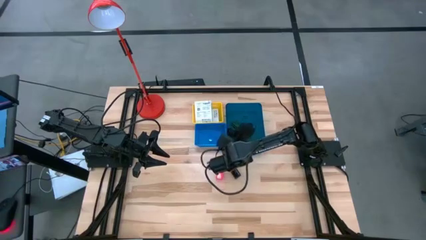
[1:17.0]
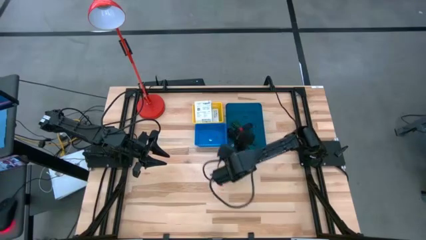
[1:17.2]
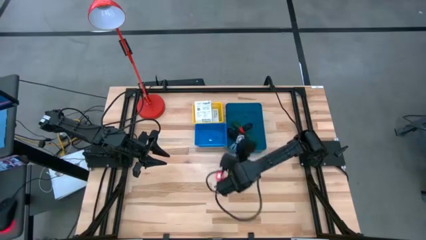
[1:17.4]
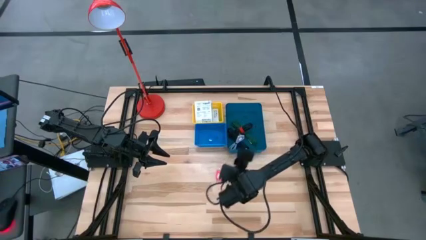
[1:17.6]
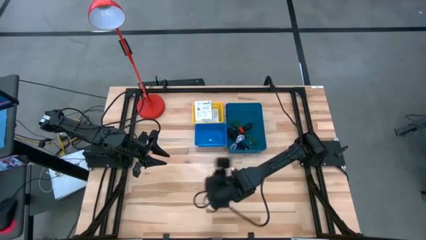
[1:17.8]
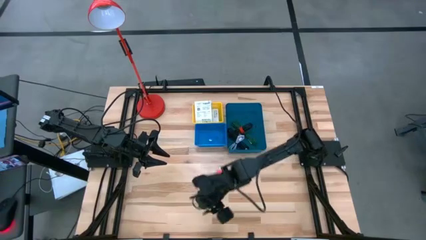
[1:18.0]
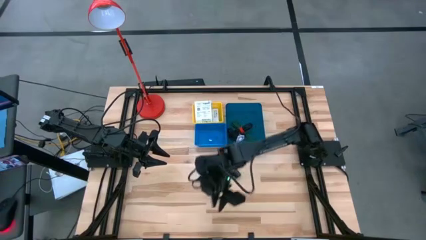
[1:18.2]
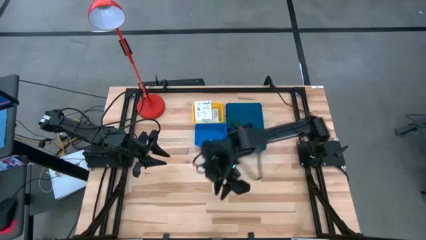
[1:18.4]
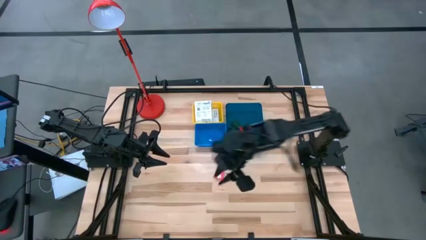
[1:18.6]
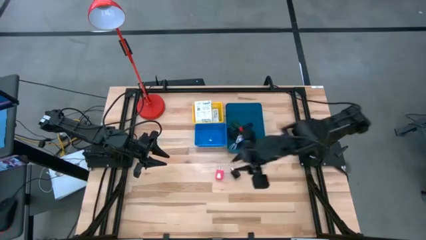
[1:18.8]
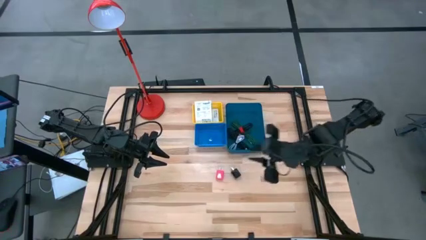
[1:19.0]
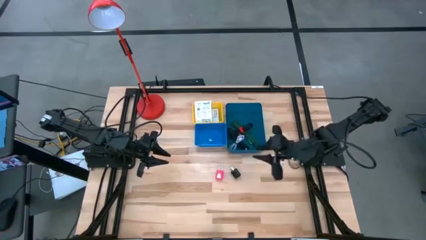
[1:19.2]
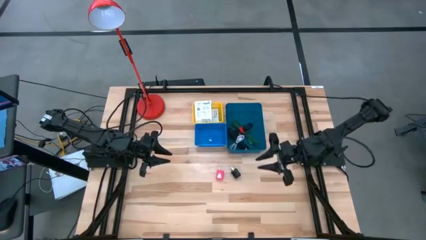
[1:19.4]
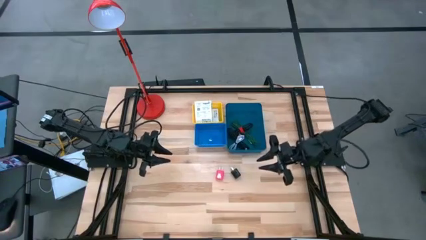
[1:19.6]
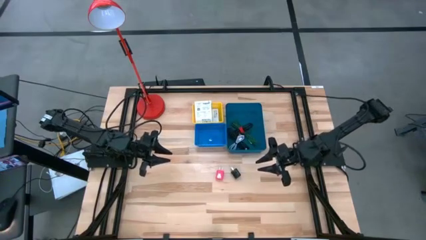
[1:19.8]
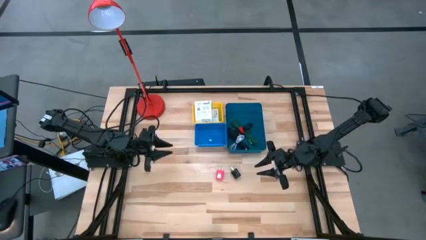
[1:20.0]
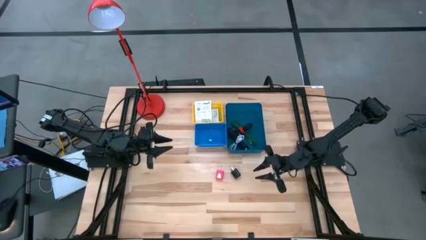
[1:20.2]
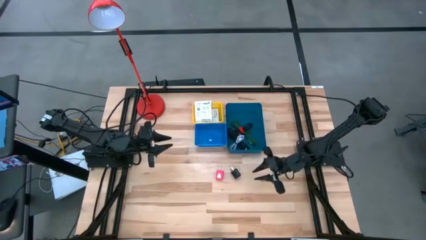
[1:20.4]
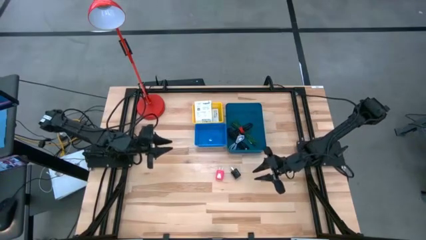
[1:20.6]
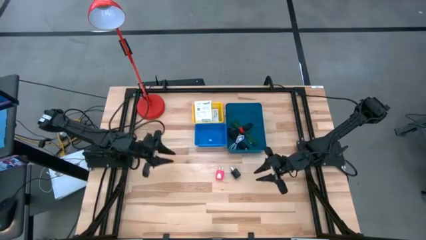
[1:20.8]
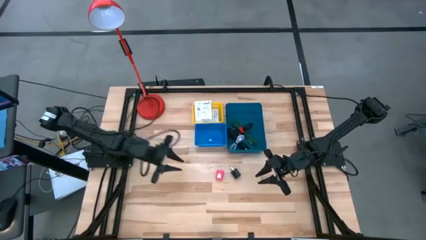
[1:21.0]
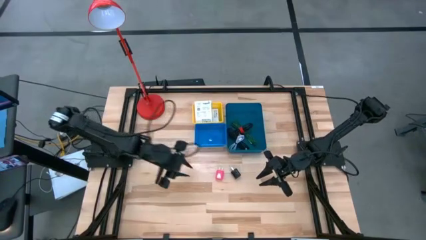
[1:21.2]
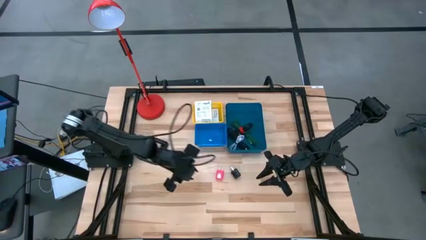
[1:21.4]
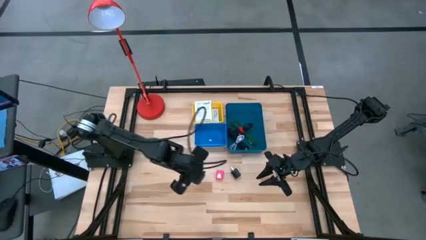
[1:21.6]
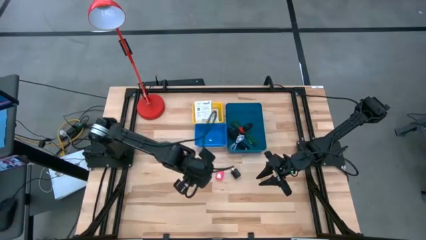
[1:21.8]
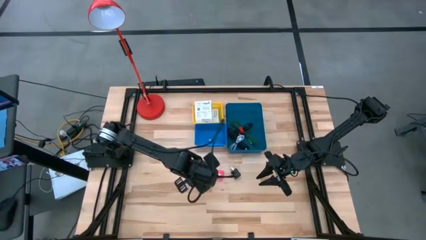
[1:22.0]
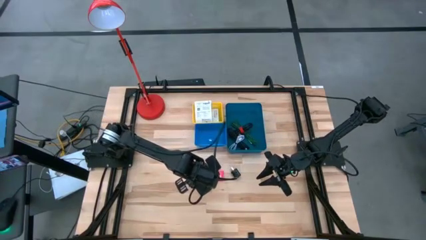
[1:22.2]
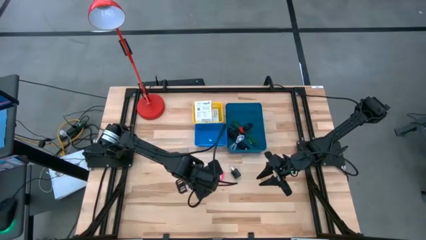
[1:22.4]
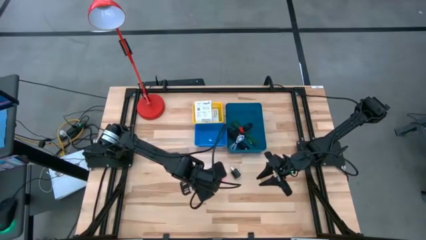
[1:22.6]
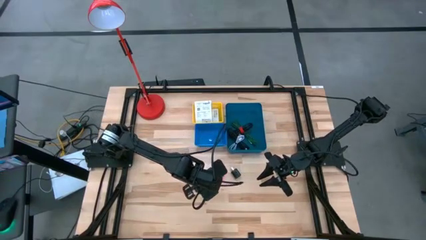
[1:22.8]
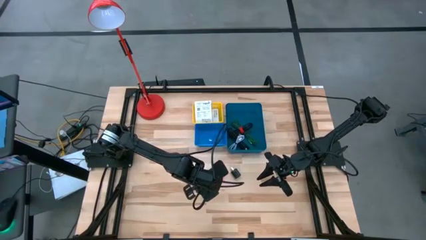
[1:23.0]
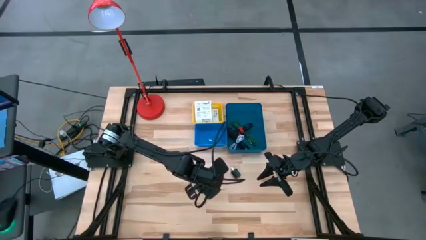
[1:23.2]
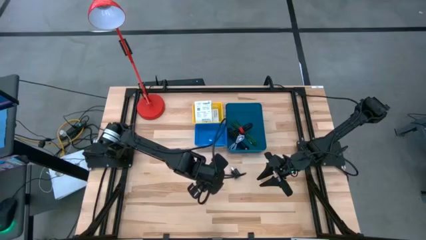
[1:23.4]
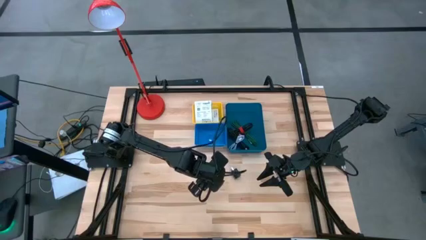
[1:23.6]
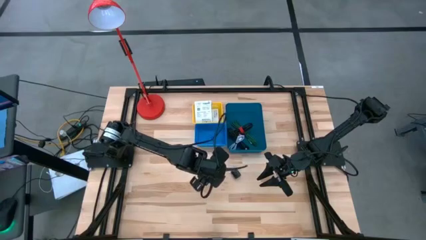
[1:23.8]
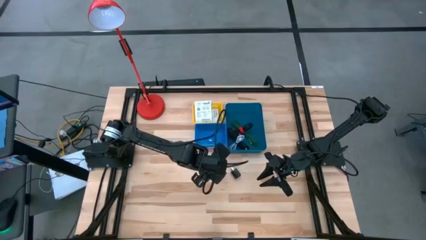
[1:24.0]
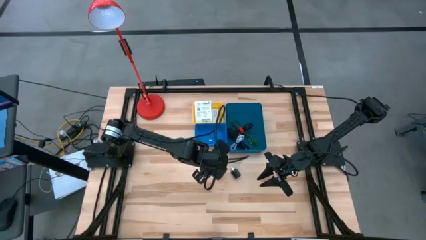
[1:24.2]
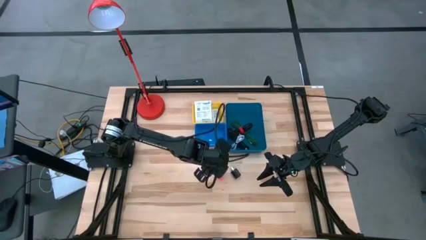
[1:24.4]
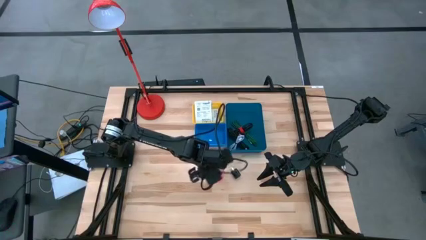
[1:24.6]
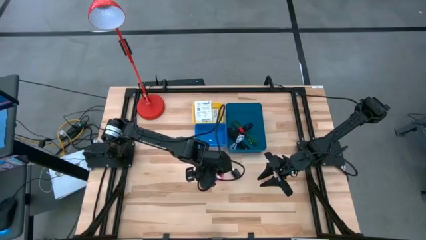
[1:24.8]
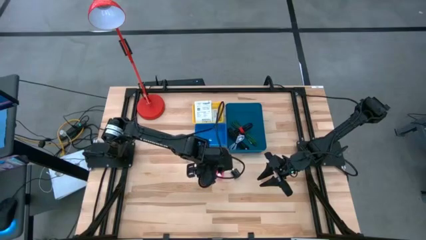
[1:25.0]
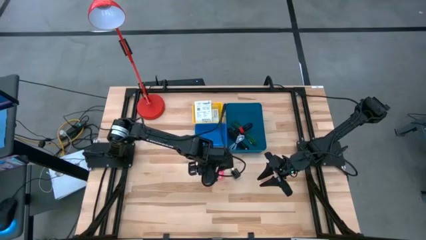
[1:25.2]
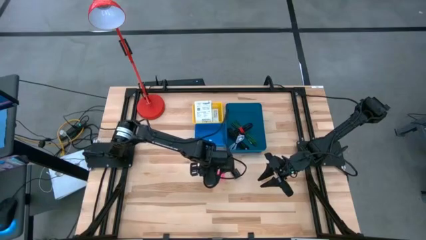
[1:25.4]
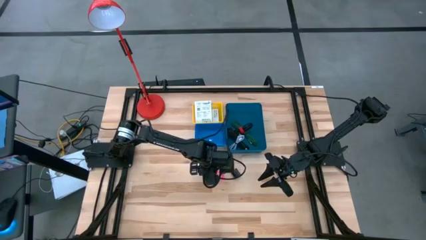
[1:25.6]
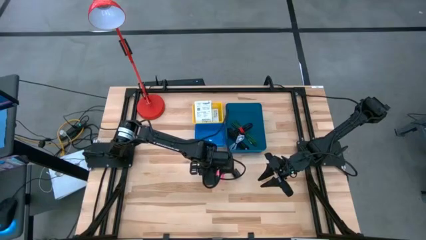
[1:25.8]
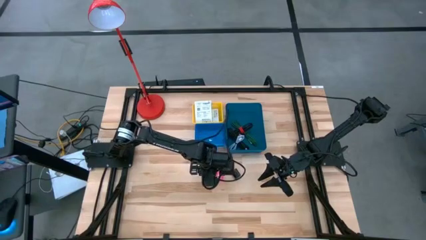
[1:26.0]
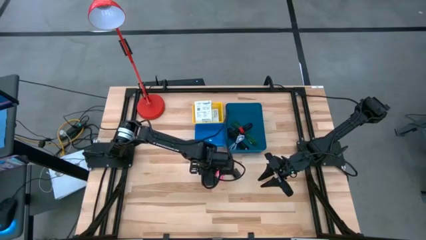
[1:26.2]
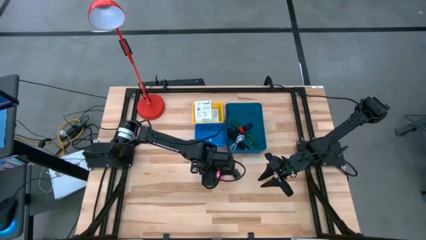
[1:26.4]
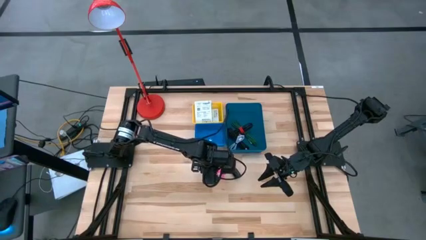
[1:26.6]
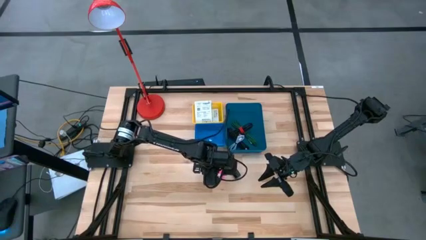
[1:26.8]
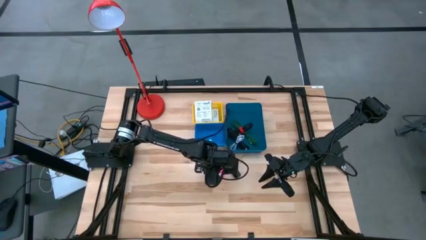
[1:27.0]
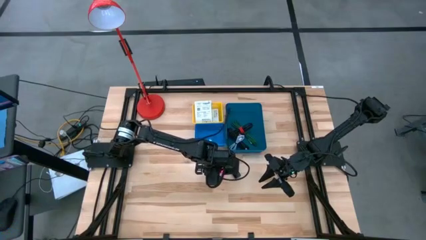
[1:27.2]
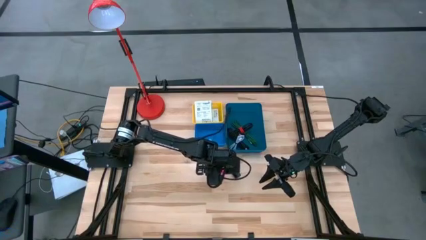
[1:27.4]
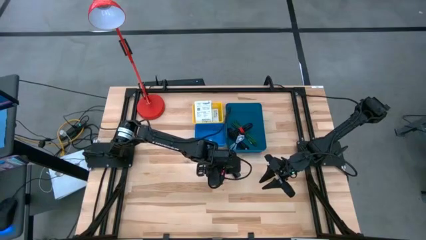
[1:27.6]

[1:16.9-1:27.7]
Task: Pick and place items into bin
Put the pink charger adapter into the dark blue bin
